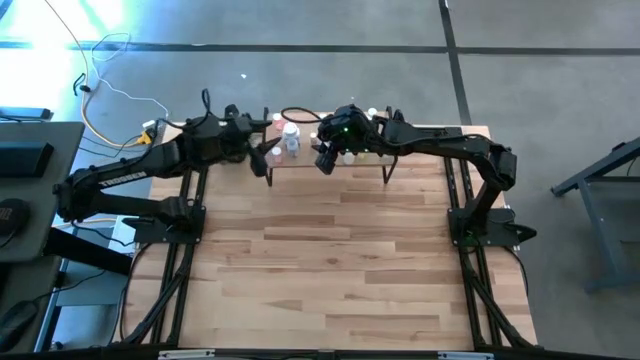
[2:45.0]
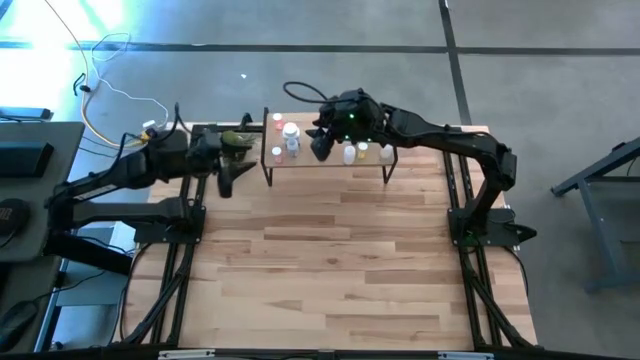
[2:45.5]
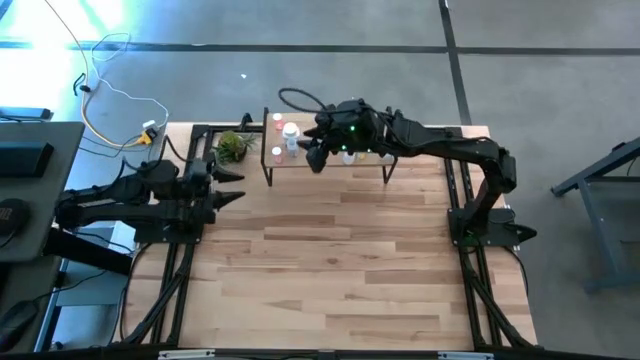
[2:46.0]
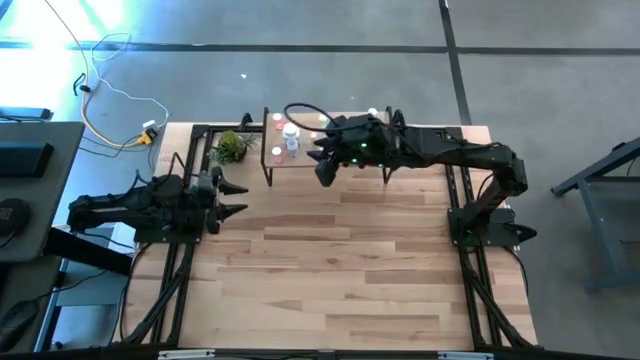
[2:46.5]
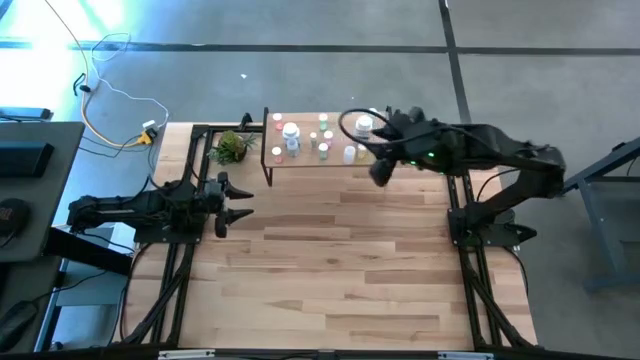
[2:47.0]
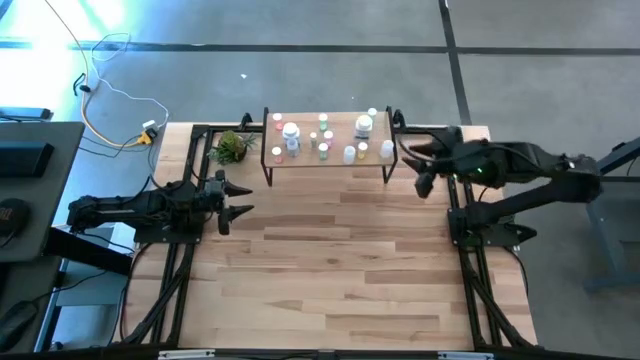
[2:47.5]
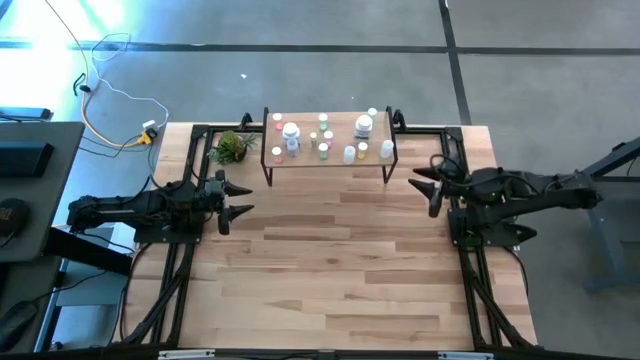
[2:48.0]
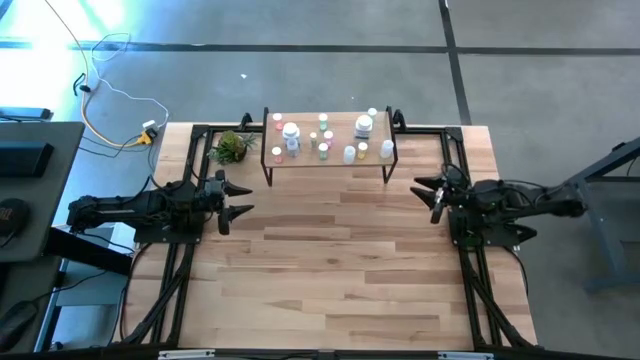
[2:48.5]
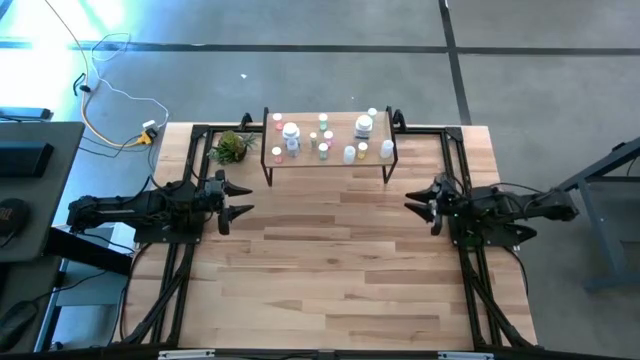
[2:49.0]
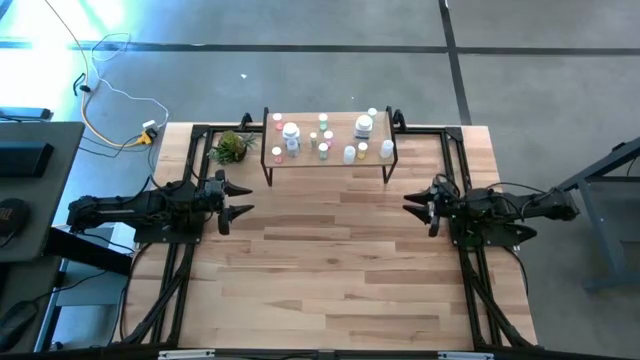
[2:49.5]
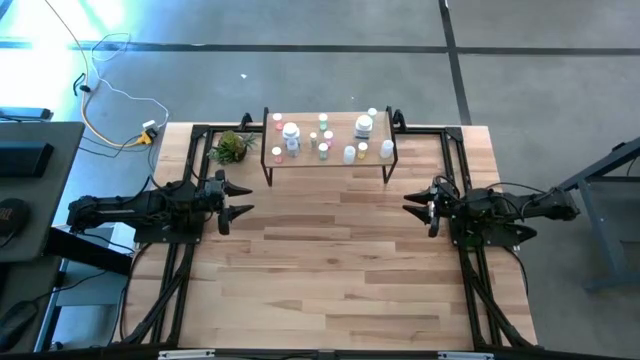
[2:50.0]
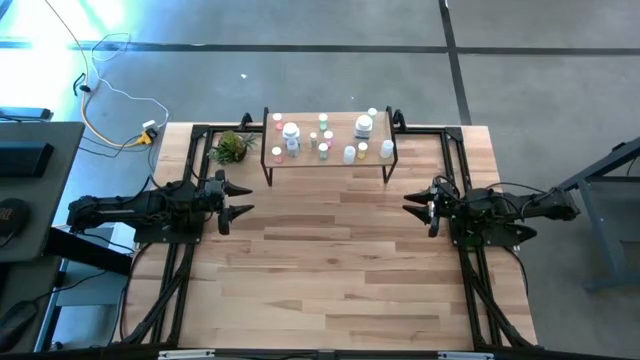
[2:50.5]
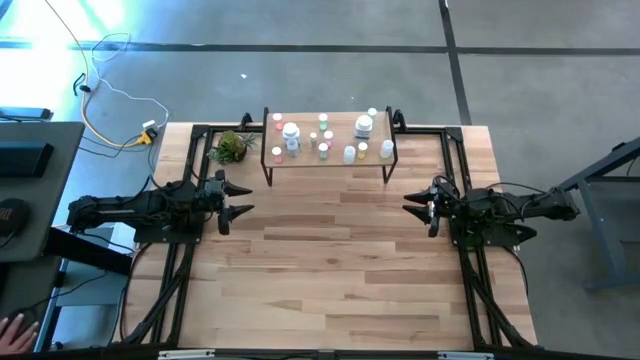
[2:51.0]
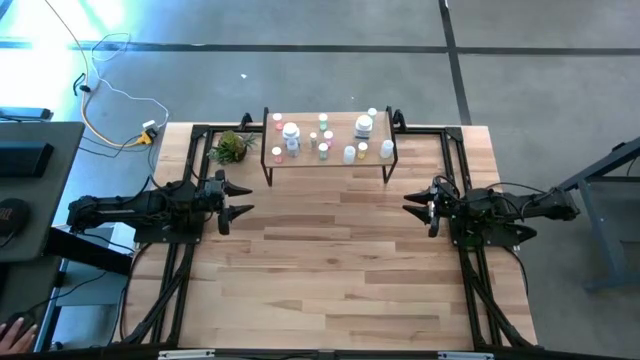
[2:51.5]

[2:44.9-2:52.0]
Task: Pick and place medicine bottles onto shelf by color
Return to Home Position

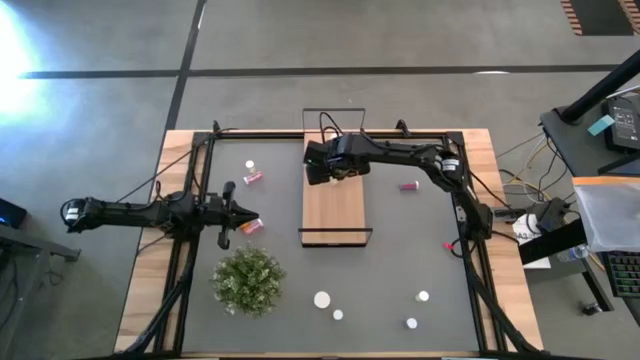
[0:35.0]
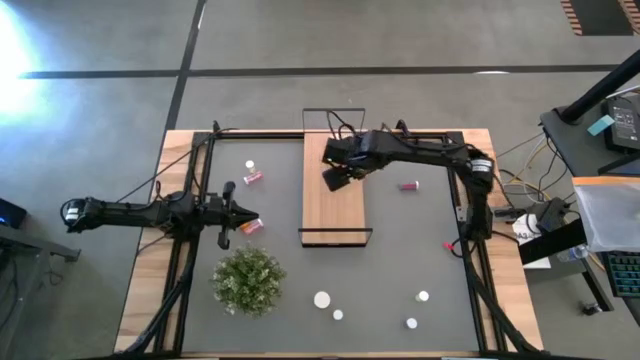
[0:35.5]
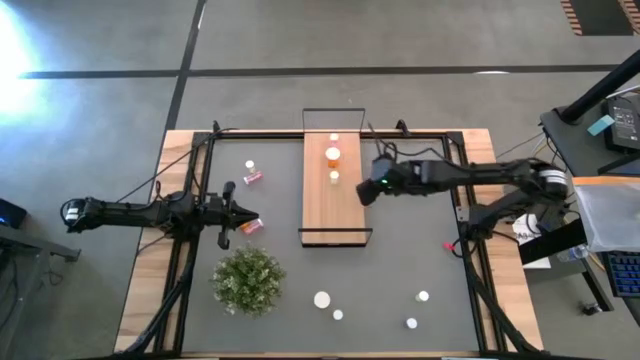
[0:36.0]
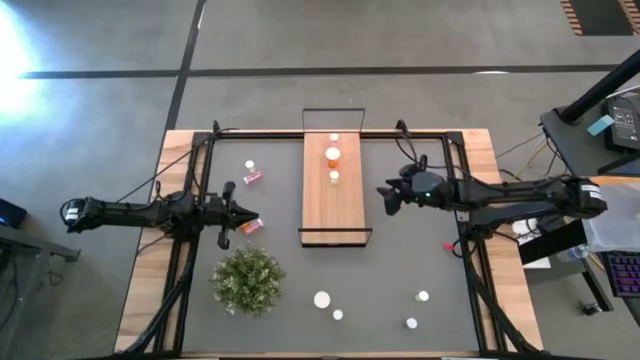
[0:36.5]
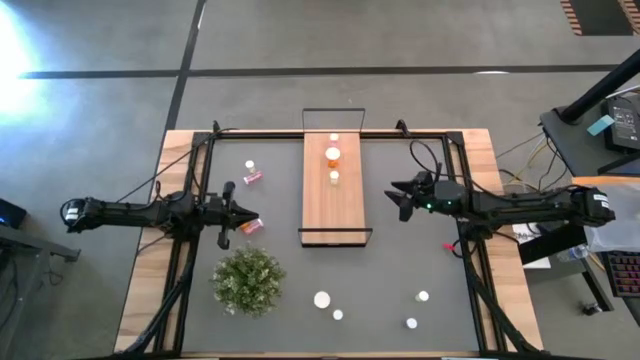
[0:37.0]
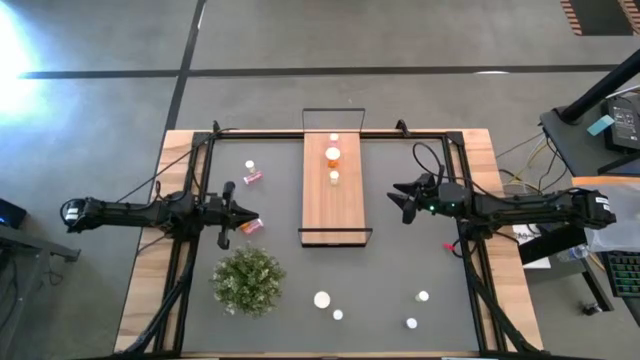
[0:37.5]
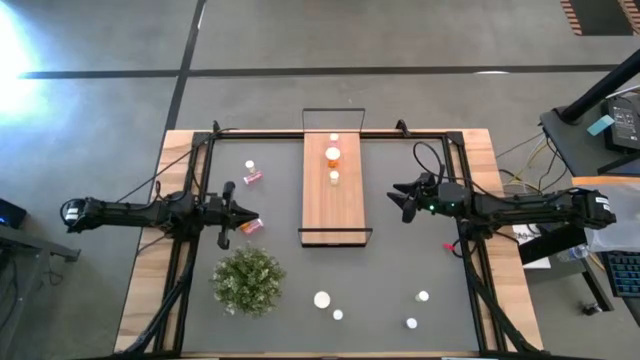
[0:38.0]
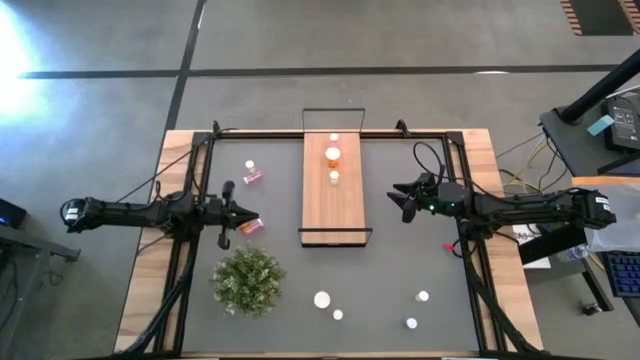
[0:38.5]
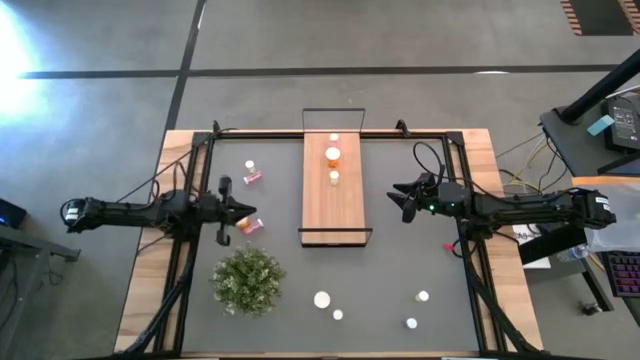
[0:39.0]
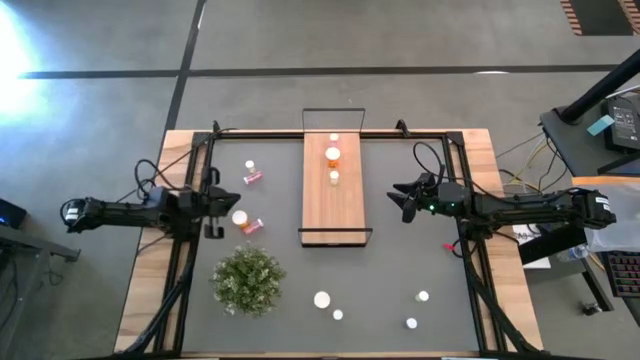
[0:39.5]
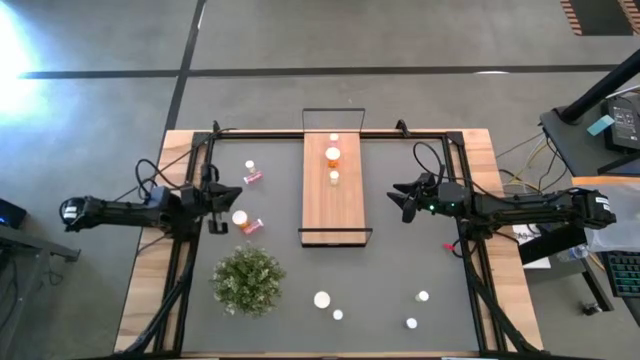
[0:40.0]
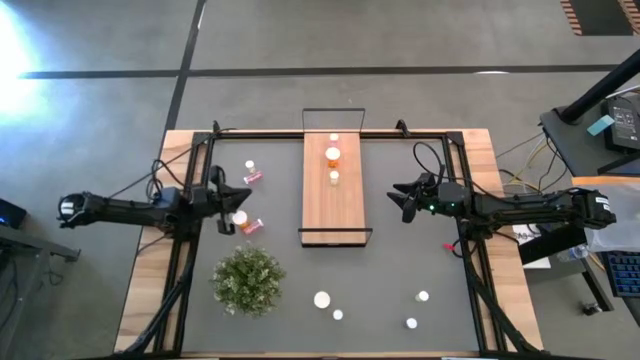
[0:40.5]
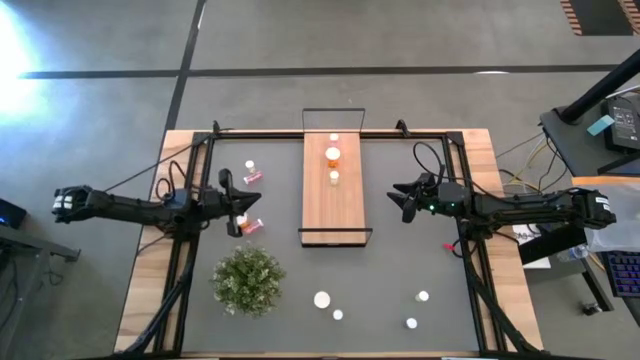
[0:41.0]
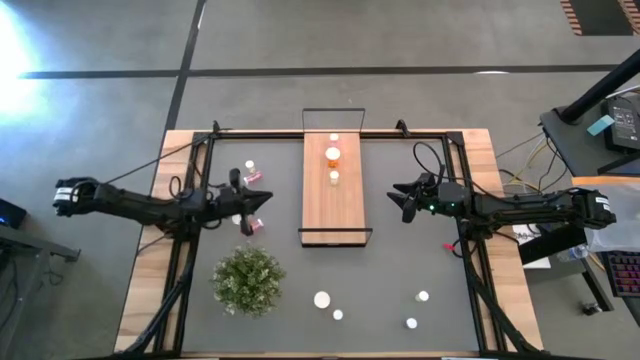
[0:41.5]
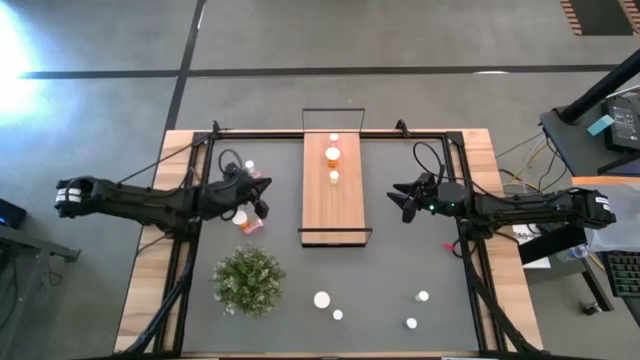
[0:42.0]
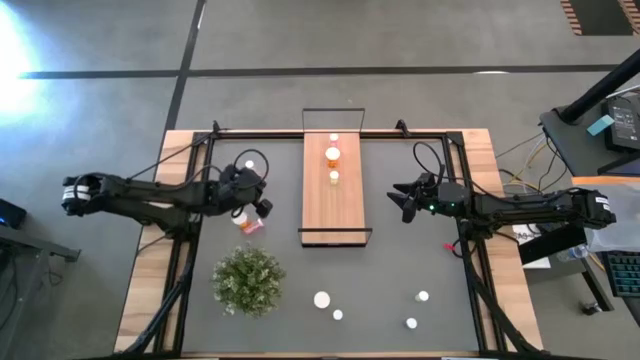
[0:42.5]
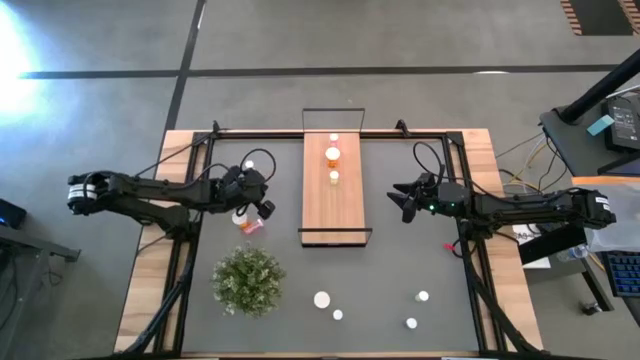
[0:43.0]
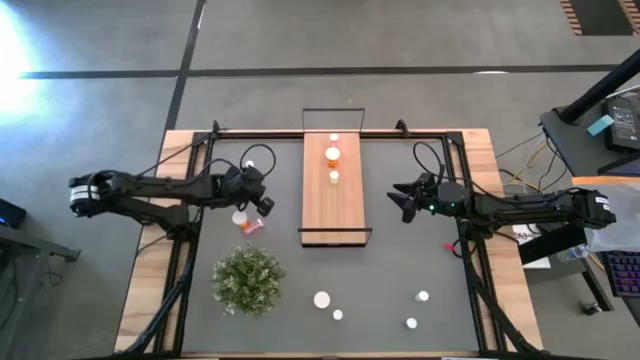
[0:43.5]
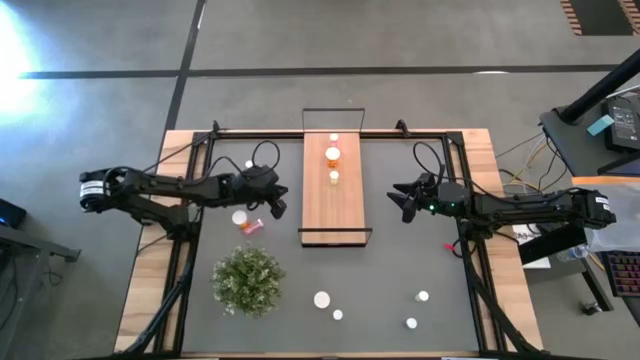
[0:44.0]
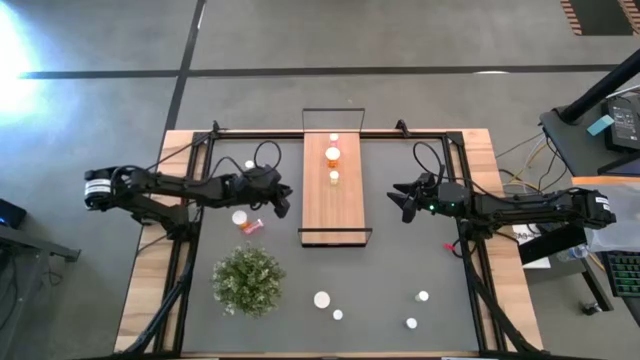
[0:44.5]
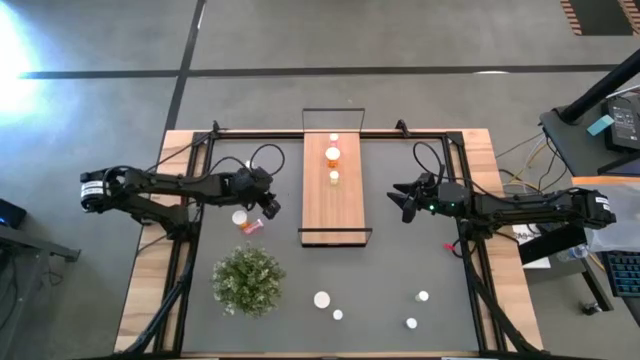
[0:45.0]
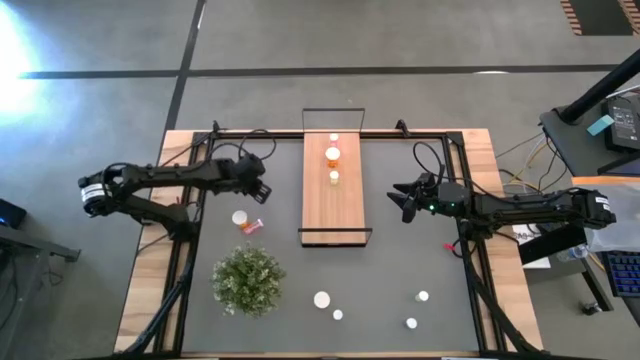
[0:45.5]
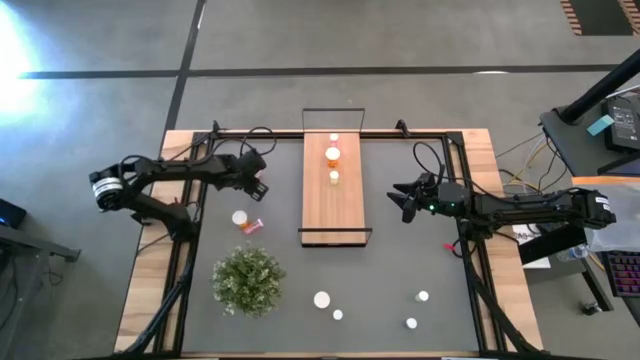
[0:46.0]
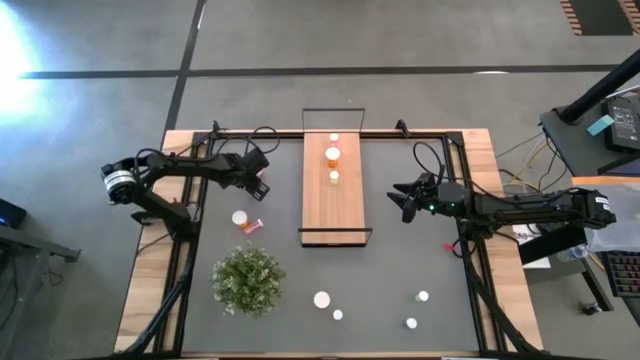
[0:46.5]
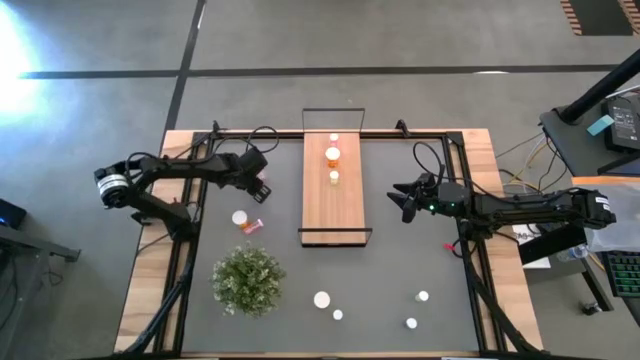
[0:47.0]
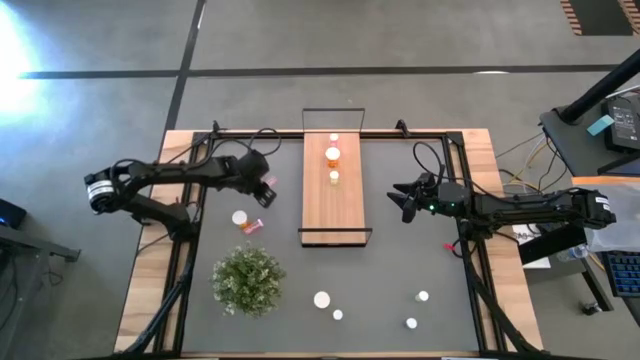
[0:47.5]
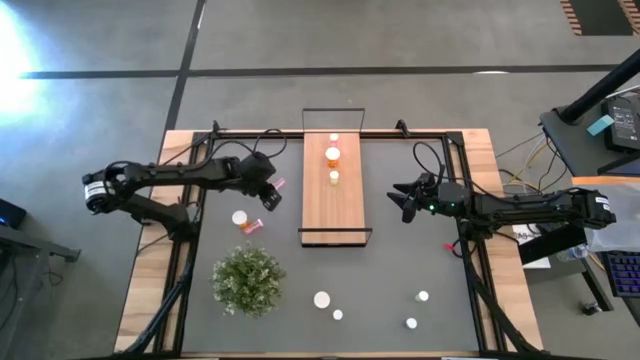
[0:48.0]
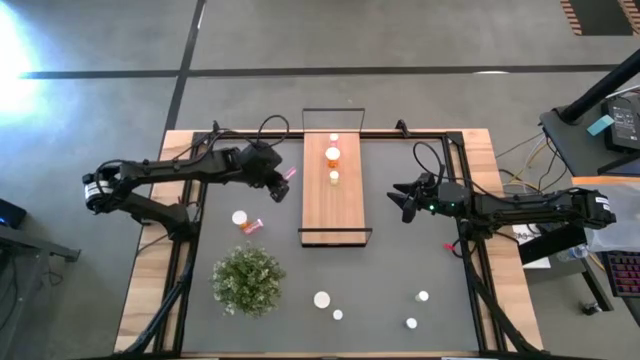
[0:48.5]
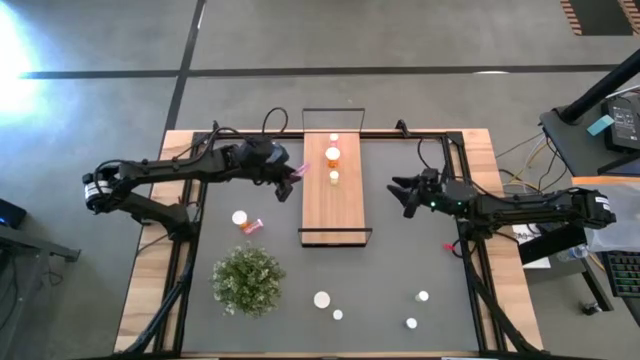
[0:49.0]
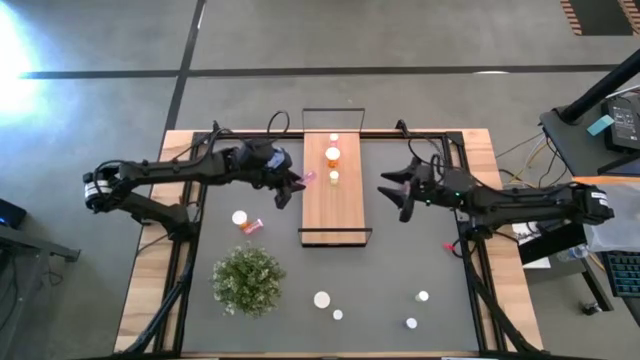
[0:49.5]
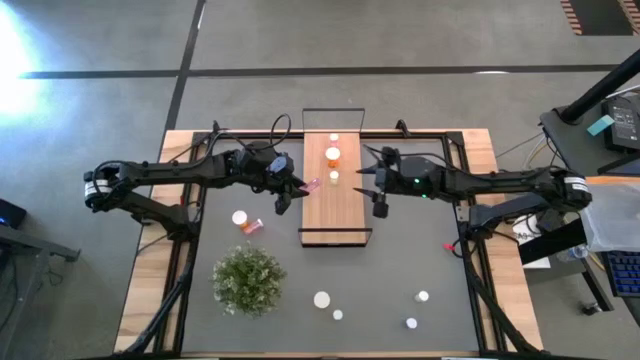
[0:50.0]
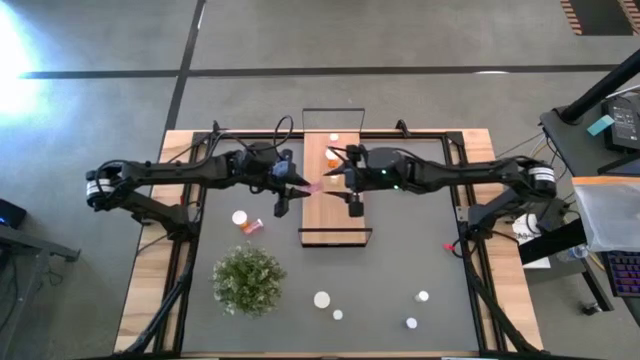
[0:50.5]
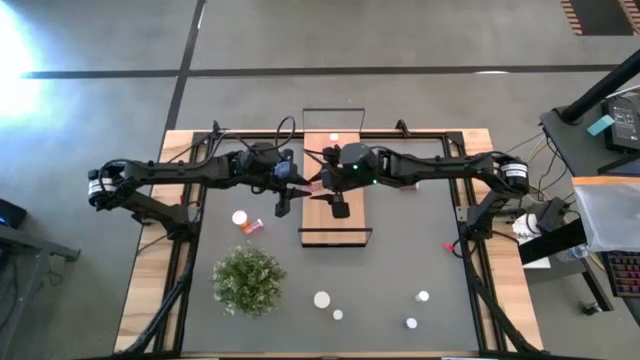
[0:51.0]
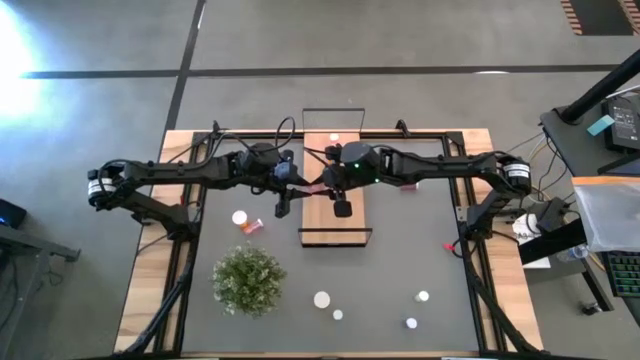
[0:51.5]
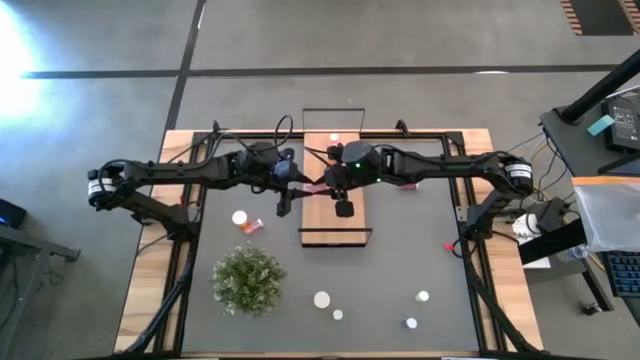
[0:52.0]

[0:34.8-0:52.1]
Task: Pick and place medicine bottles onto shelf by color
Put the top pink pill bottle on the shelf aligned with the other pink pill bottle
